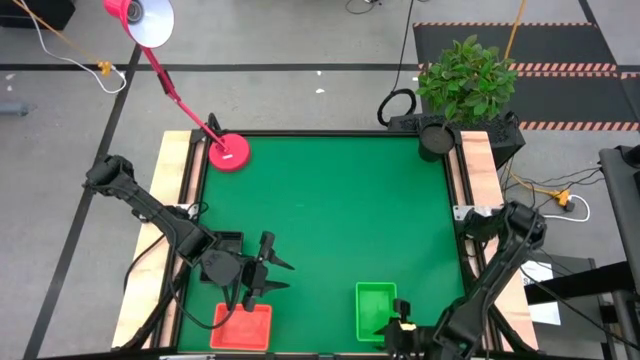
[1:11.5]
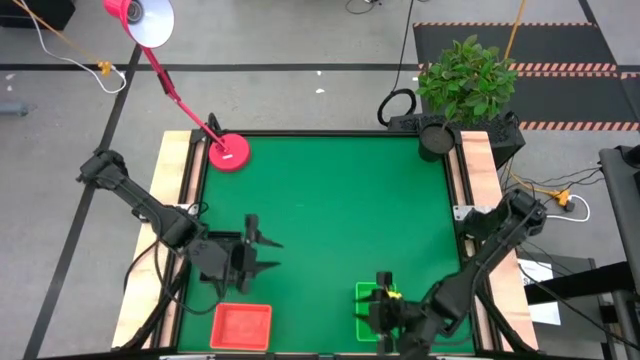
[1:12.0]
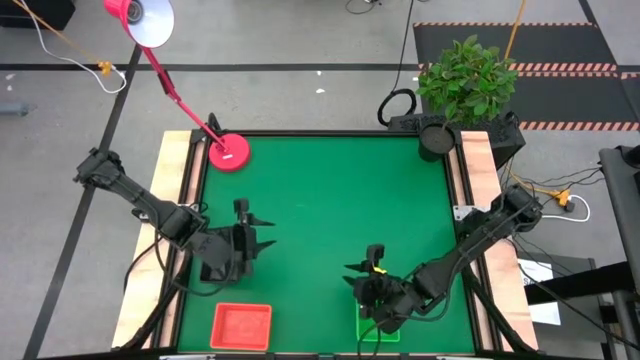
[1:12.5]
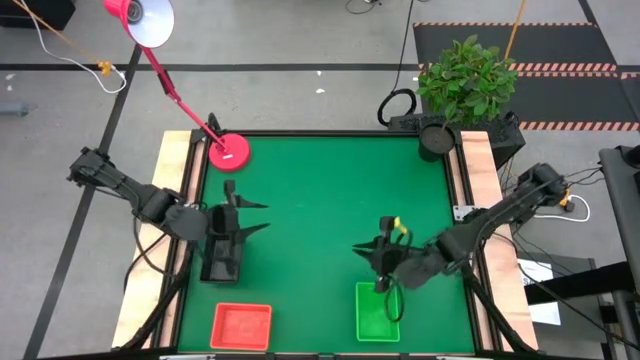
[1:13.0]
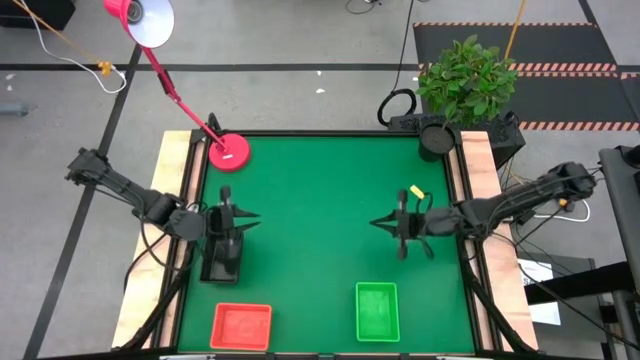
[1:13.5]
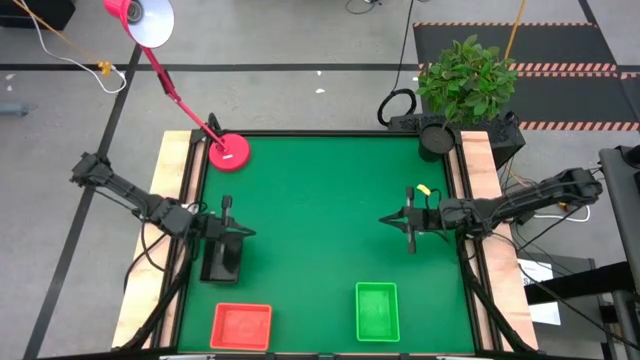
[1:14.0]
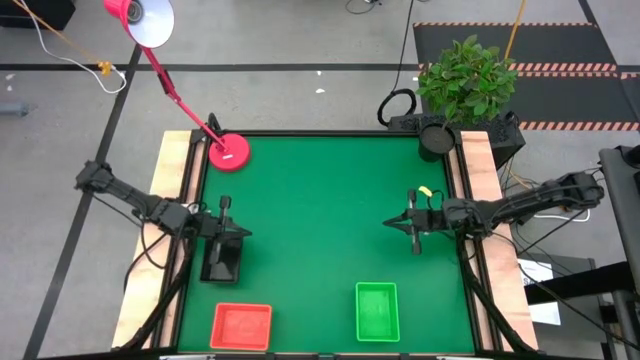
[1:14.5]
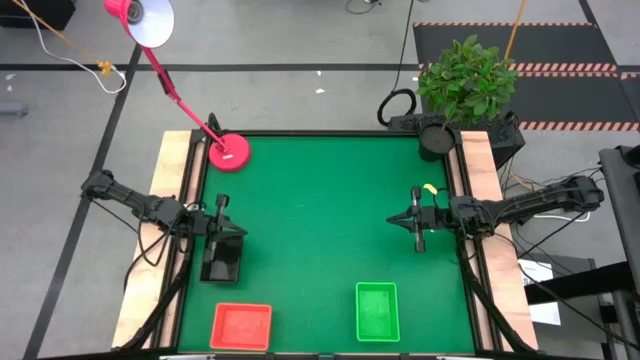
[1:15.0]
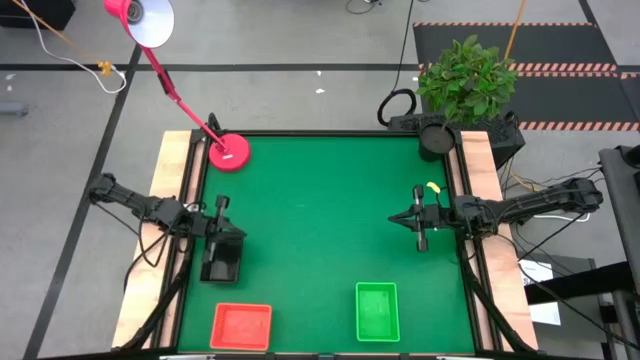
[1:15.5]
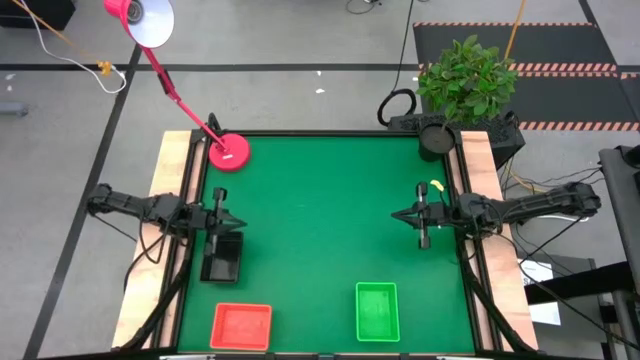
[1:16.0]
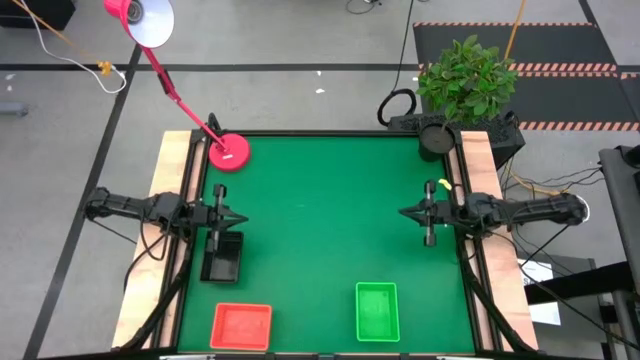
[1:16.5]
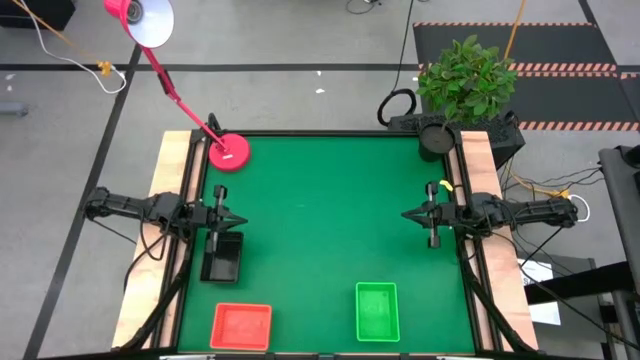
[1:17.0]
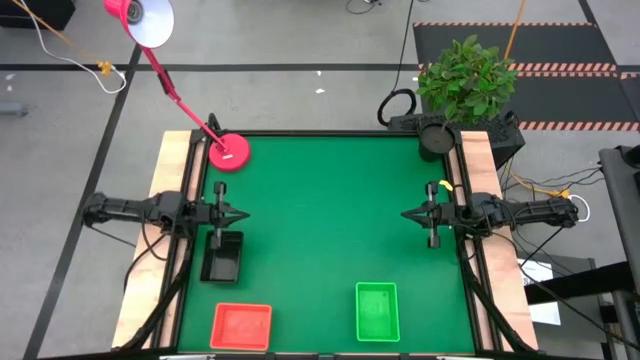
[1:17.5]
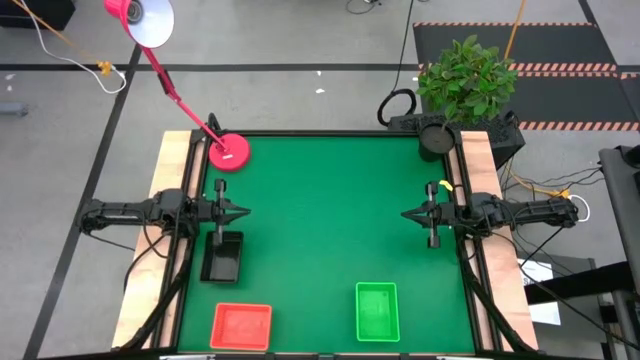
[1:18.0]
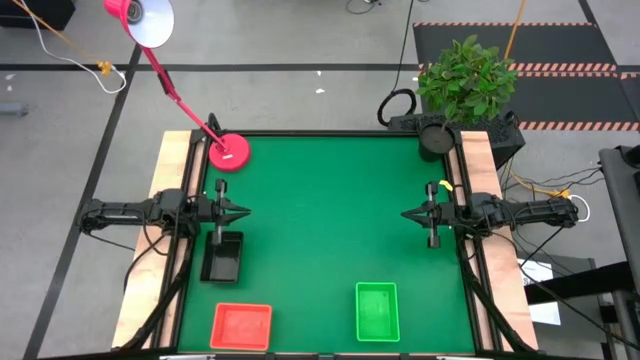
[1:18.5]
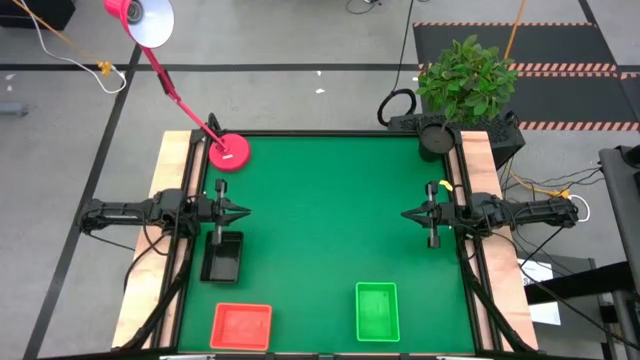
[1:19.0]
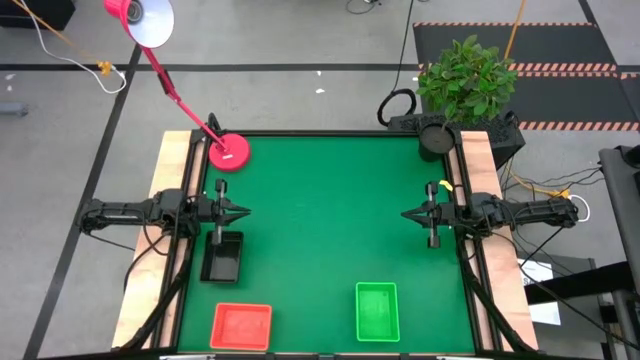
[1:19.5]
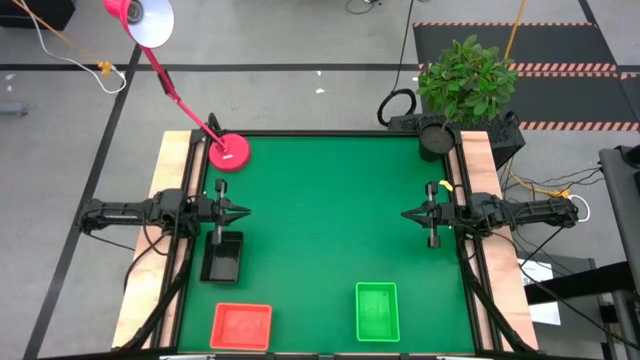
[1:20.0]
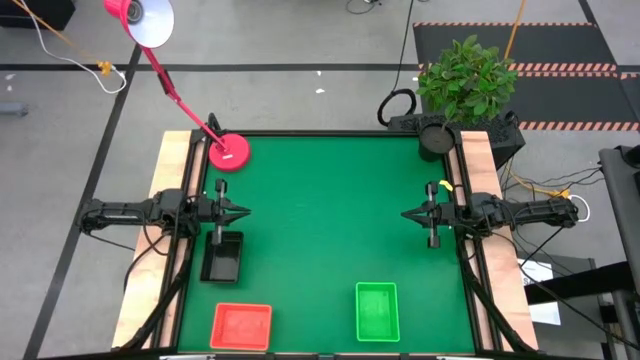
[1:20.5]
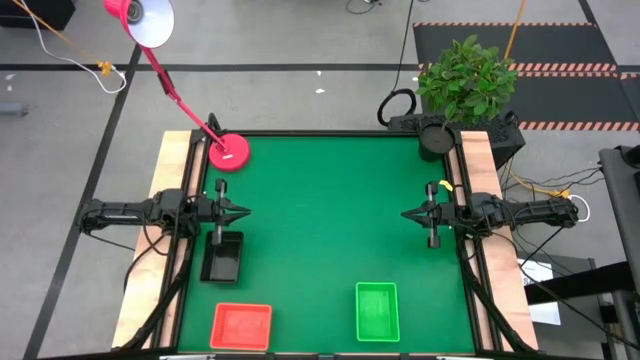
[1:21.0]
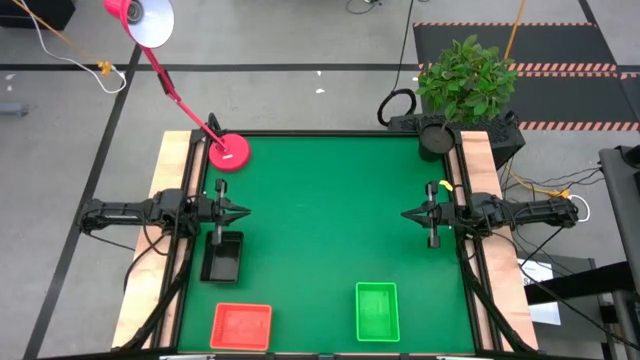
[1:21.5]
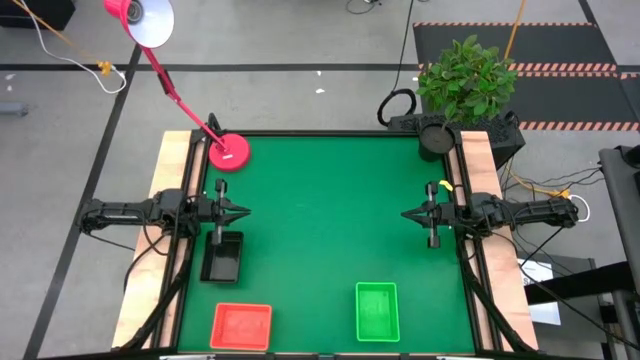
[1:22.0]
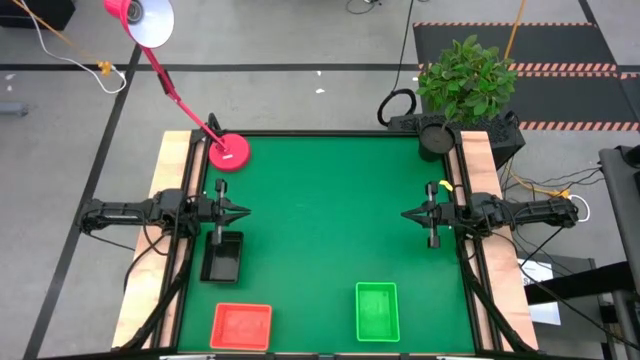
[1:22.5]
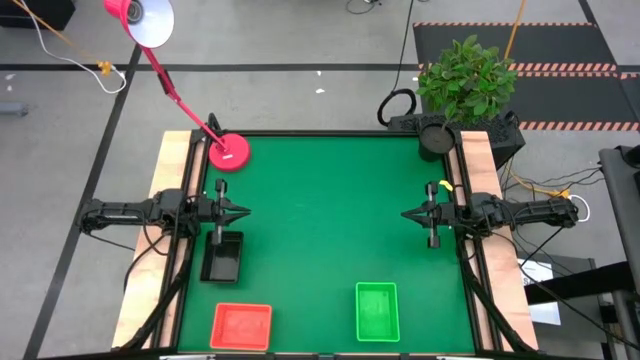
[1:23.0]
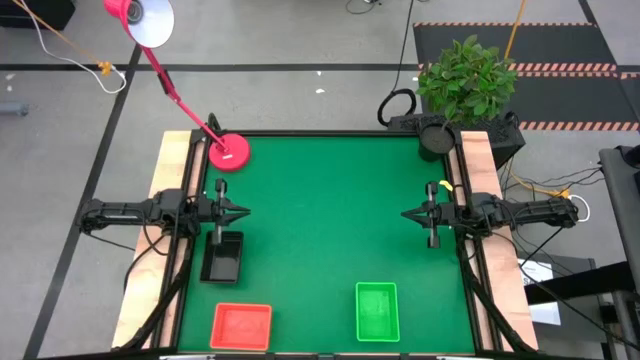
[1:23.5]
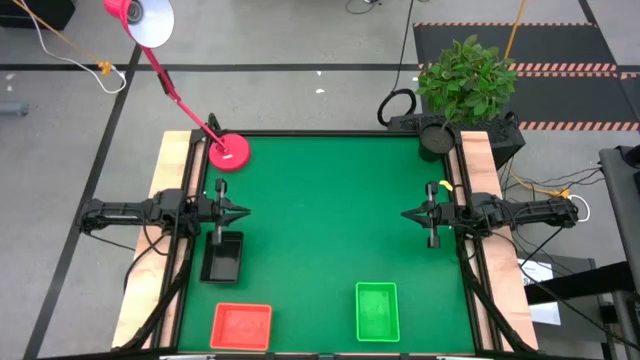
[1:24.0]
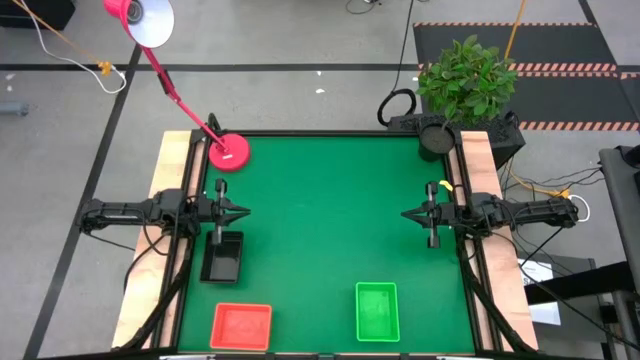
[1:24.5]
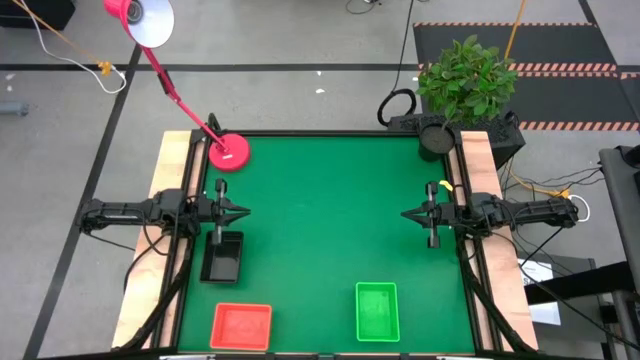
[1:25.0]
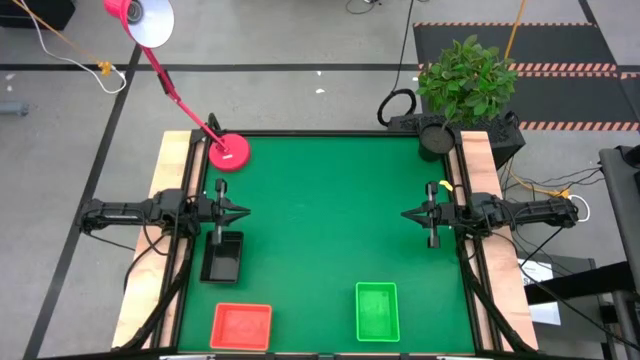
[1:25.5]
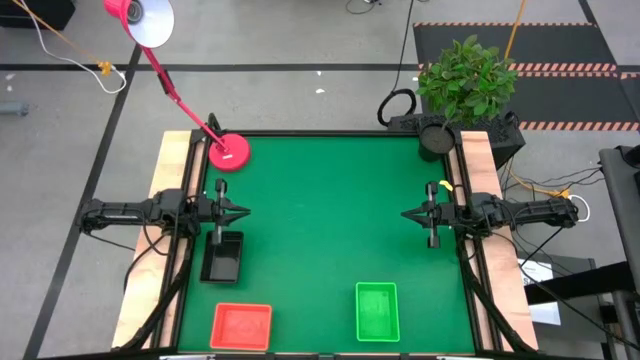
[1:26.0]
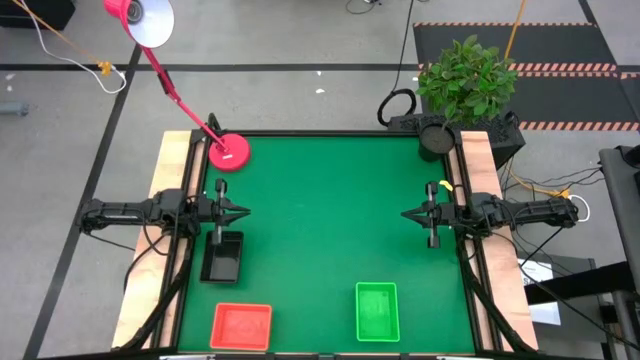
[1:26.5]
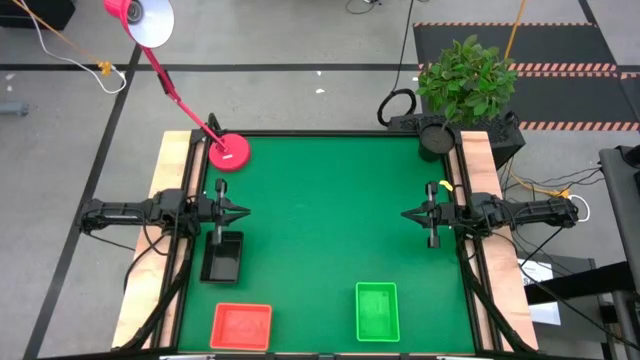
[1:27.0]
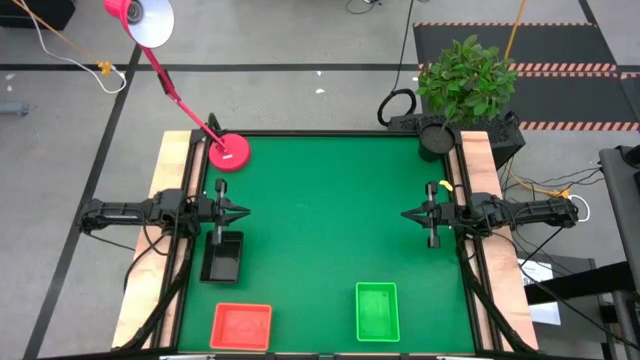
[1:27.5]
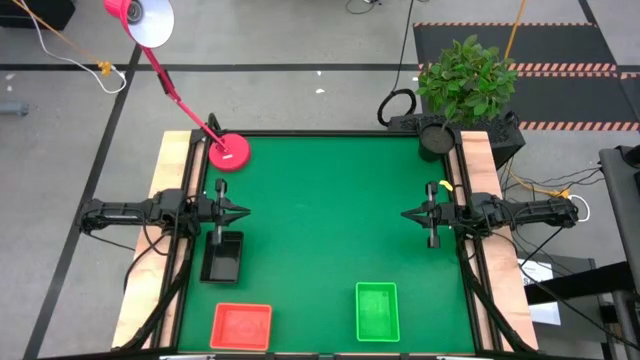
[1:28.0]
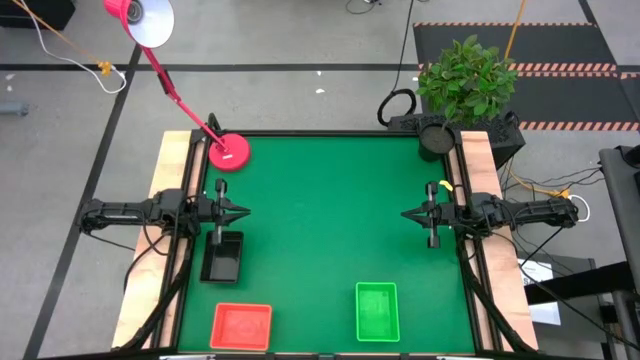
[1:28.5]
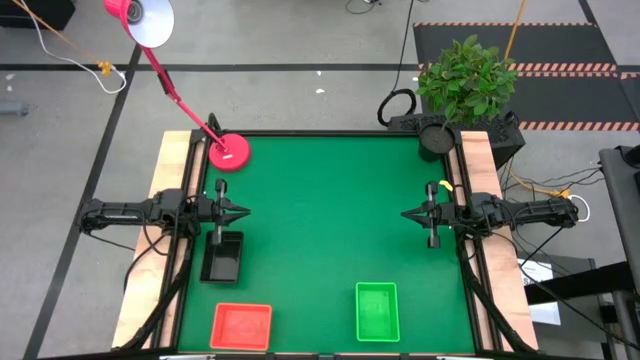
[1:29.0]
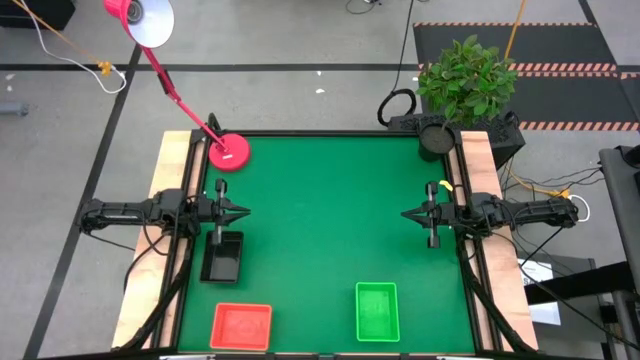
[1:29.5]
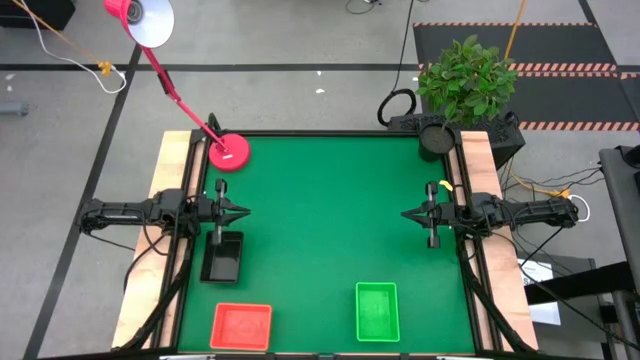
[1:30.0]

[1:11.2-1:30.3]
Return to Home Position
